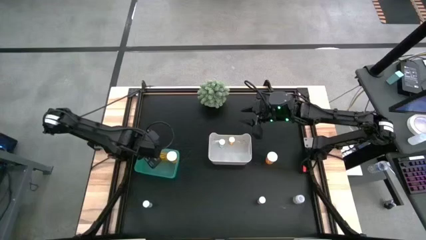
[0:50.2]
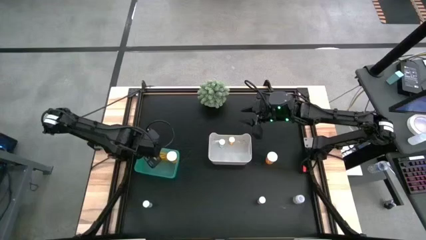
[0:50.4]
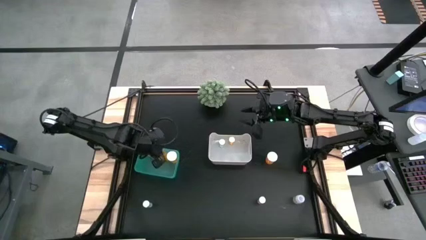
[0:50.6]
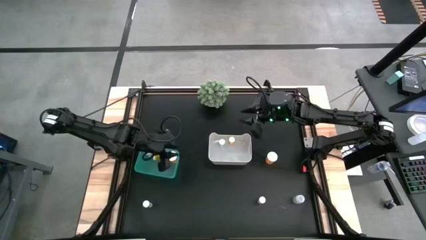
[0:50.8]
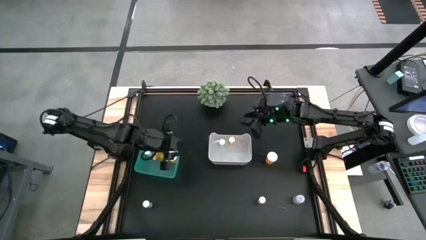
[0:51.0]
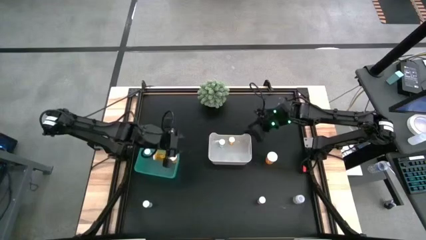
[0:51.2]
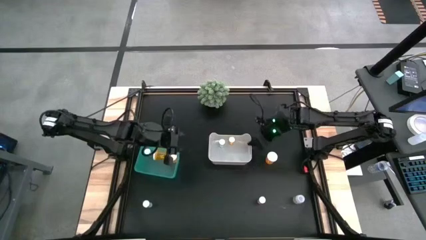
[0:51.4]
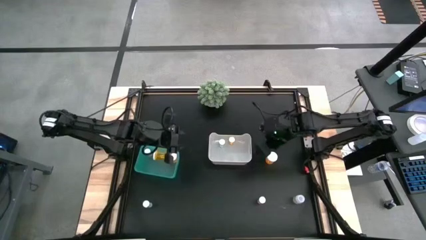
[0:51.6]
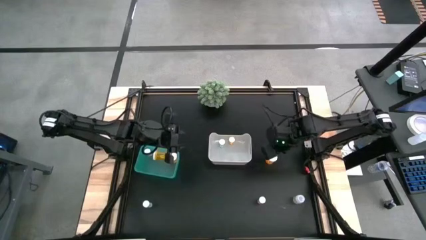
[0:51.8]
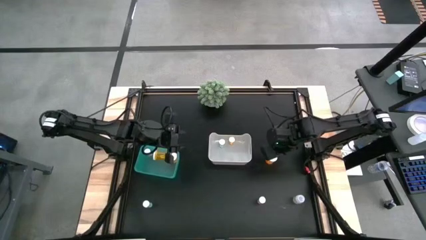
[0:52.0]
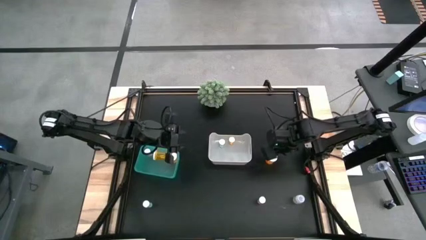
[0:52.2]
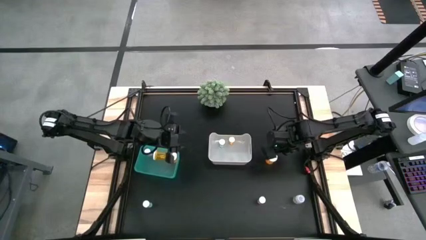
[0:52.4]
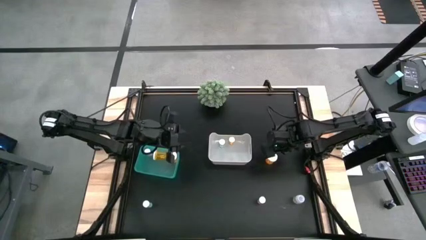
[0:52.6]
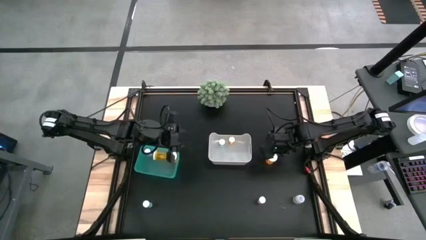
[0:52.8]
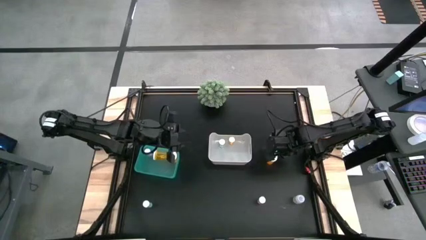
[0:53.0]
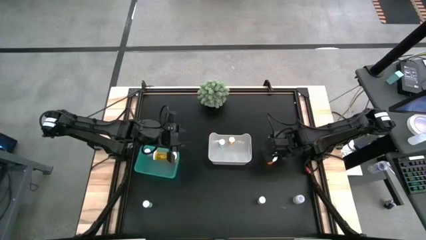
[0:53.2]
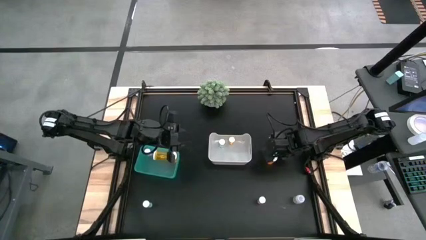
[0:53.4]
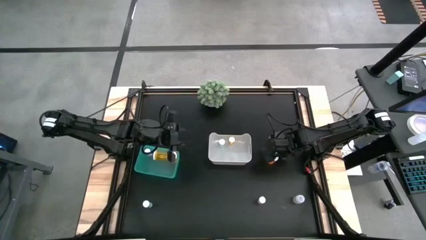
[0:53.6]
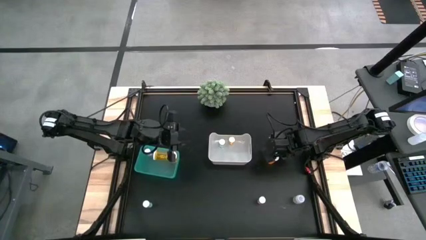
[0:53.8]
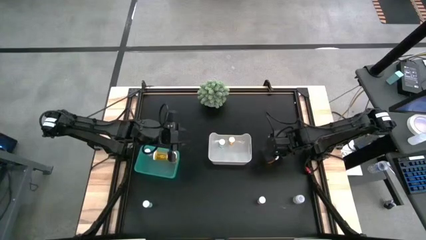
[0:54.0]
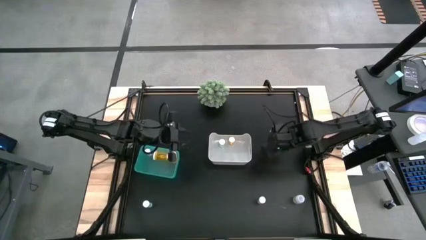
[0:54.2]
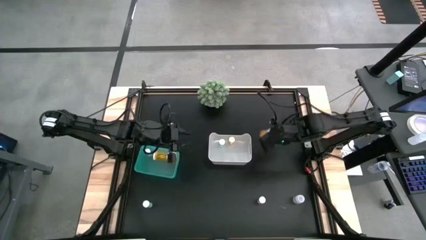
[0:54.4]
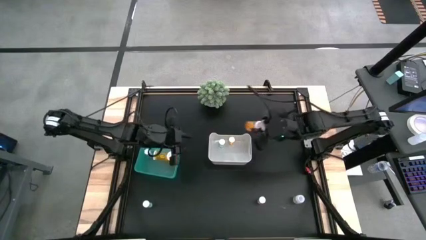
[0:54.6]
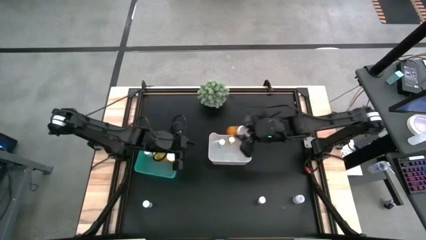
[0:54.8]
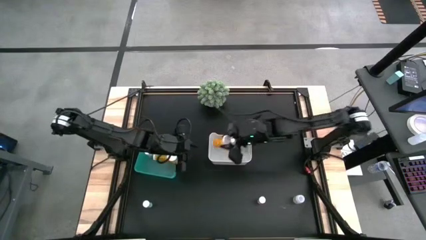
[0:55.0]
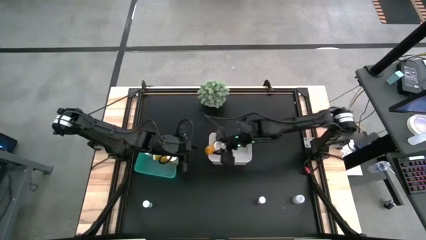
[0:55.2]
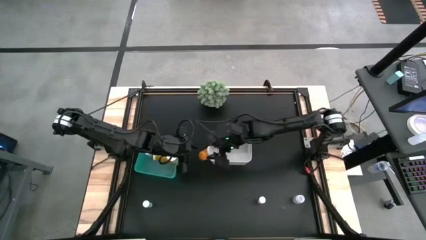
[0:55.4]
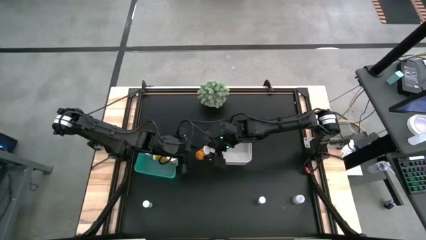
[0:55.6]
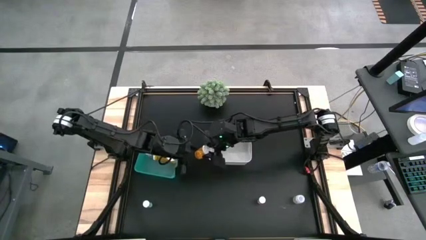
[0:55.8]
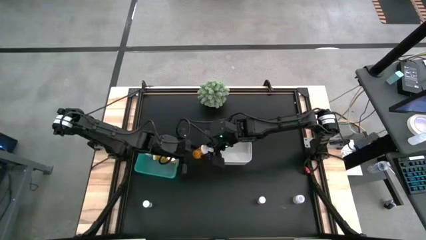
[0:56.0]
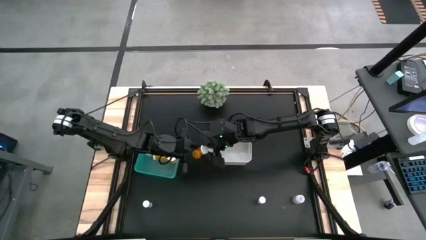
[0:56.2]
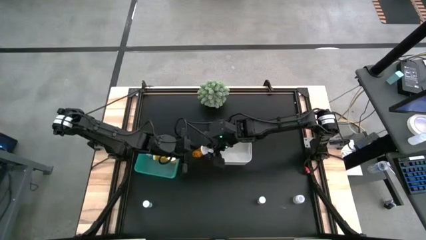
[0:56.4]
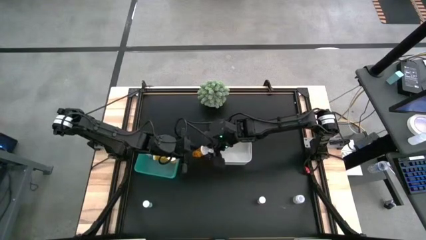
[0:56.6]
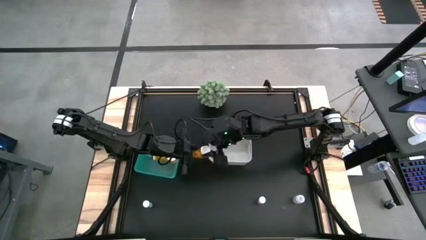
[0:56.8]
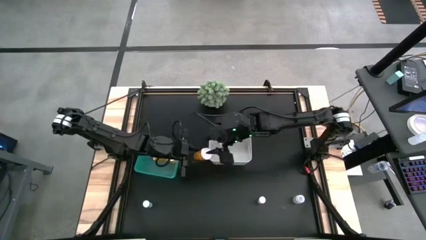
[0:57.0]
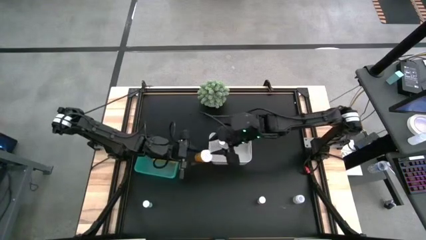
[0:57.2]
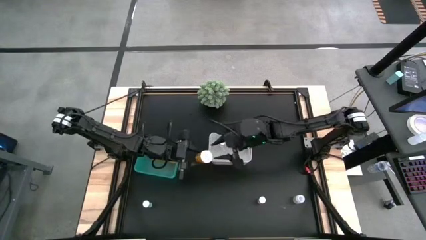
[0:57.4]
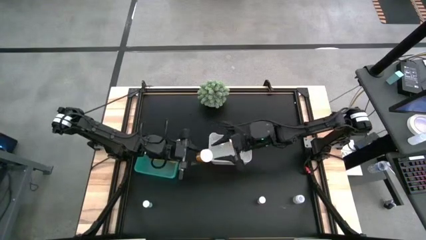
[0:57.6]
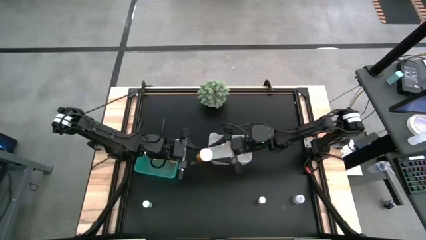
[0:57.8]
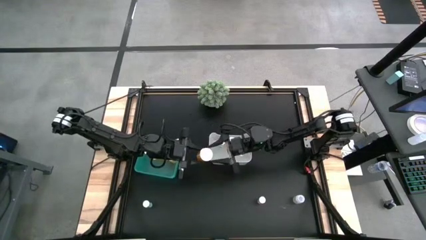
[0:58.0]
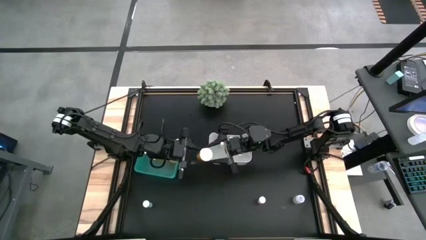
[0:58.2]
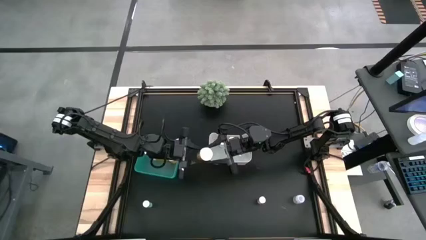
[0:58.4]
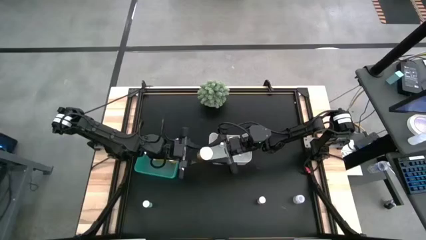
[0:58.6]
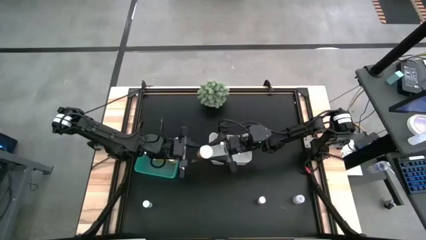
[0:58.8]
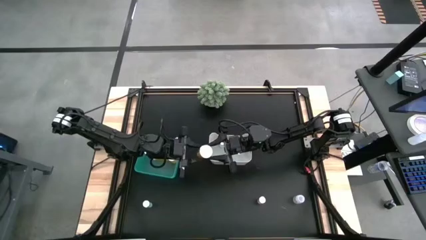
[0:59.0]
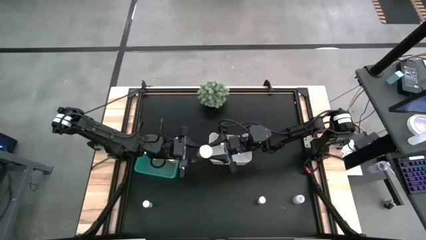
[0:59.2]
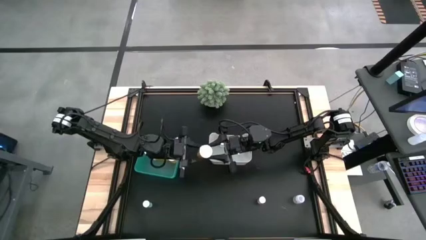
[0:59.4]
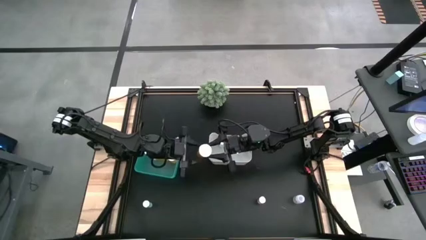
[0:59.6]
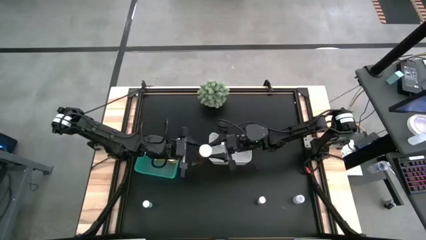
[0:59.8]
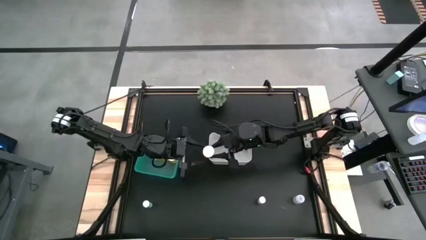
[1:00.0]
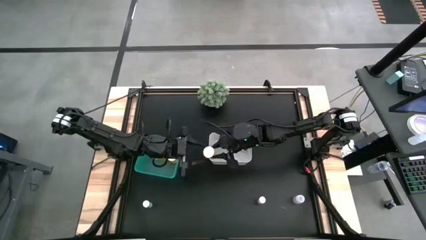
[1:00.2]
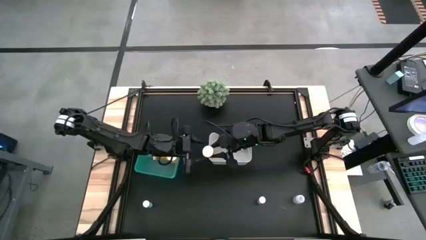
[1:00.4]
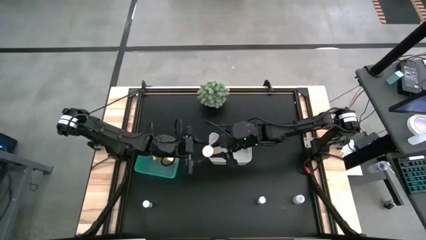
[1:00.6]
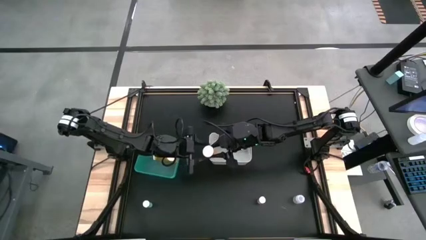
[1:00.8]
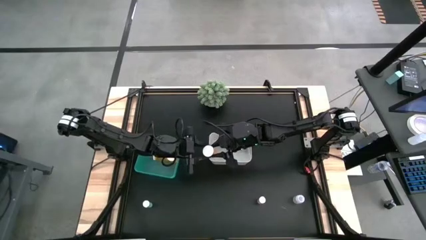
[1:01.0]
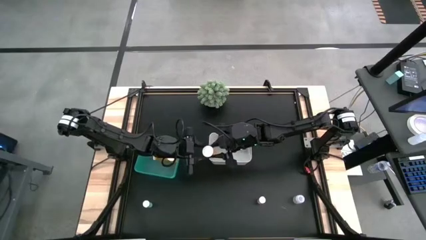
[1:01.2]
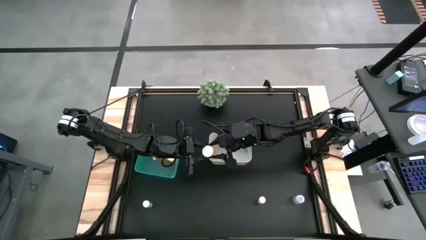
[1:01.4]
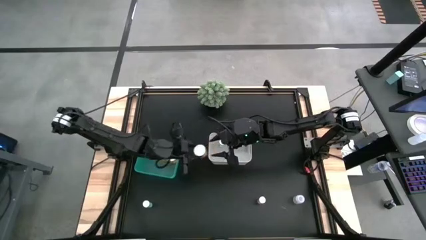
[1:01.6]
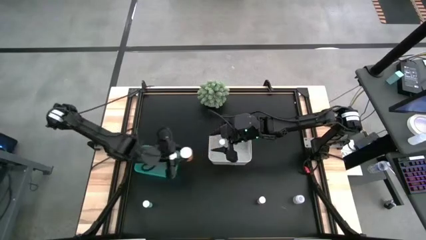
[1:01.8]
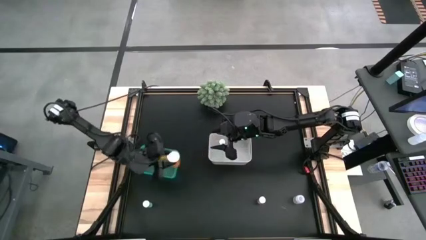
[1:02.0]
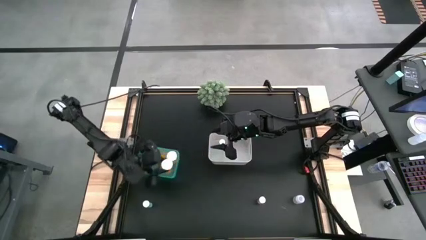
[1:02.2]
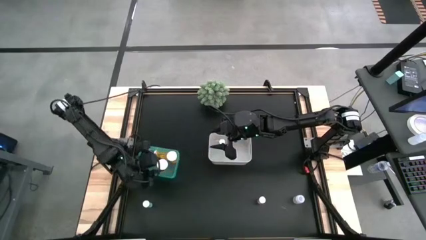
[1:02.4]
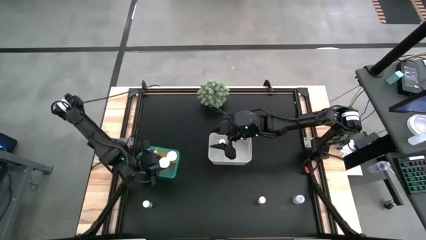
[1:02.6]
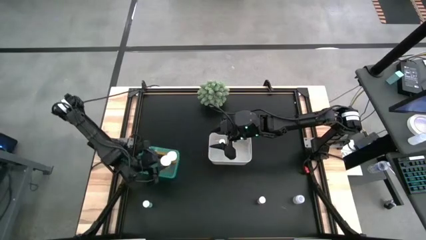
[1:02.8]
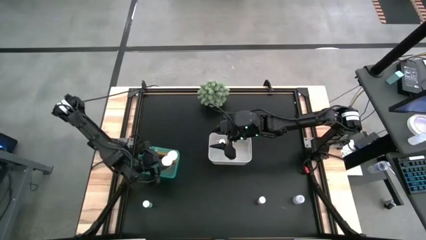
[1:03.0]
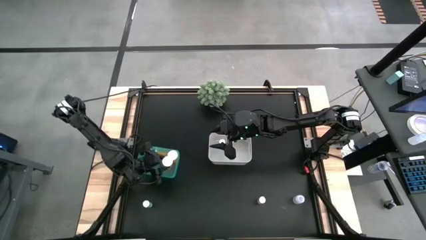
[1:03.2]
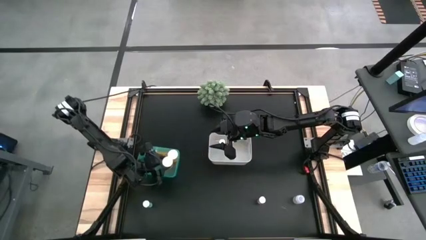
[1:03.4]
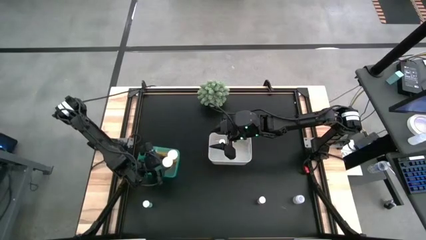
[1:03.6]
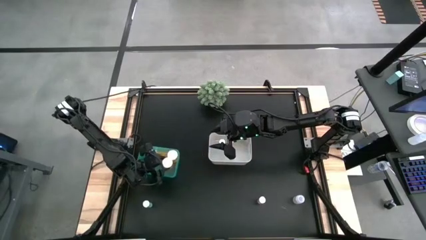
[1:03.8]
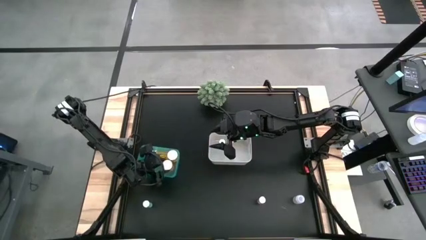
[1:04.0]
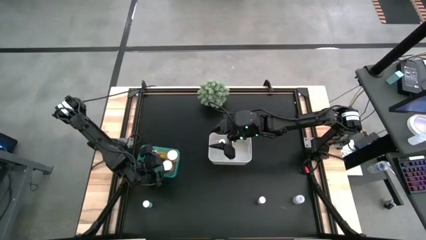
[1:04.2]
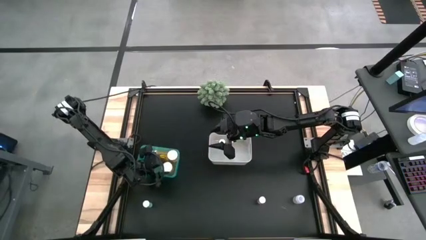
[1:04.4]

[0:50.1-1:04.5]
Task: Pick and place medicine bottles into bin by pill shape (circle, oval)
Put the orange capsule bottle into the blue bin

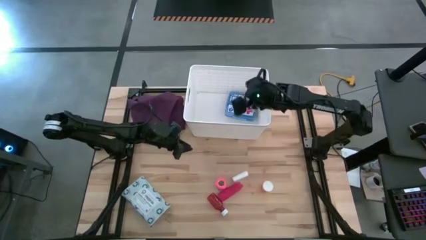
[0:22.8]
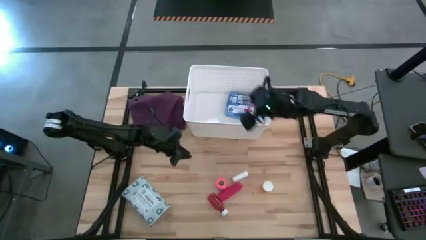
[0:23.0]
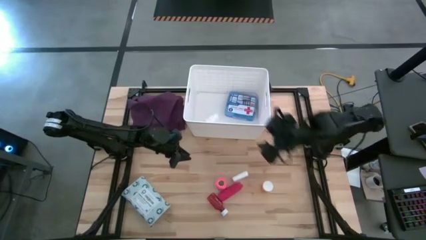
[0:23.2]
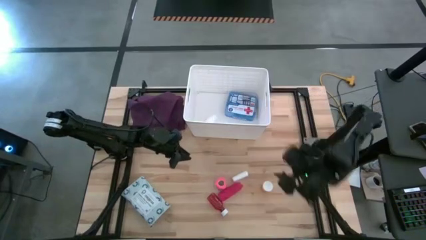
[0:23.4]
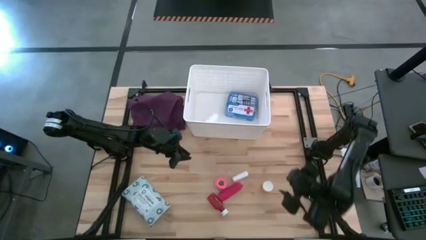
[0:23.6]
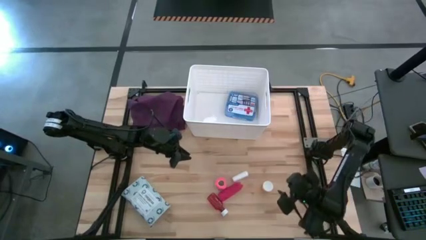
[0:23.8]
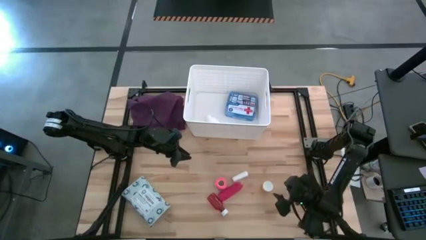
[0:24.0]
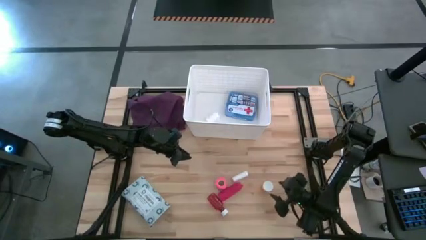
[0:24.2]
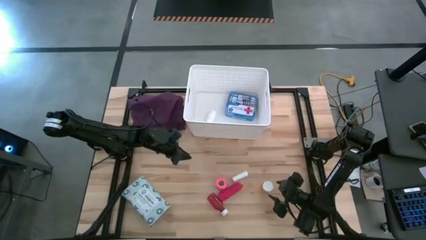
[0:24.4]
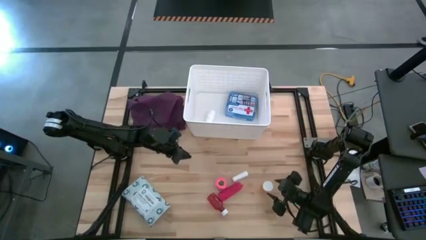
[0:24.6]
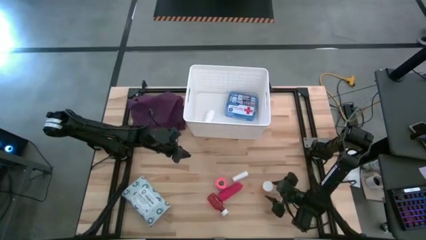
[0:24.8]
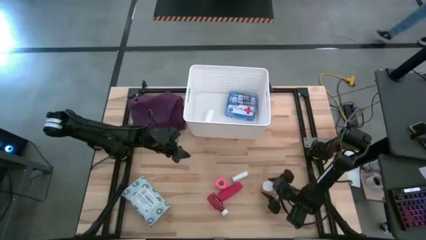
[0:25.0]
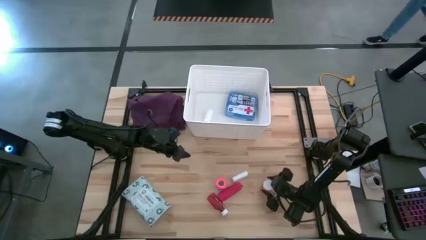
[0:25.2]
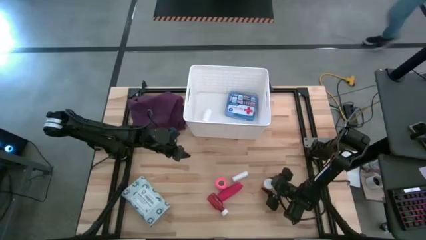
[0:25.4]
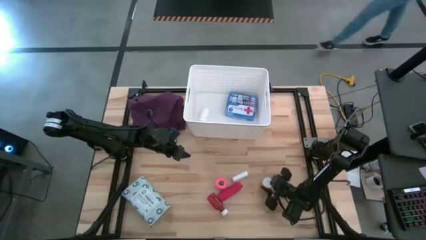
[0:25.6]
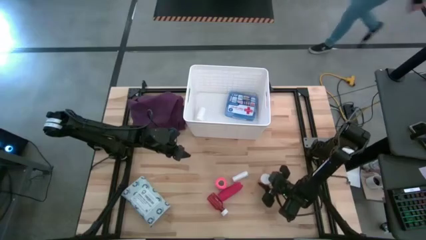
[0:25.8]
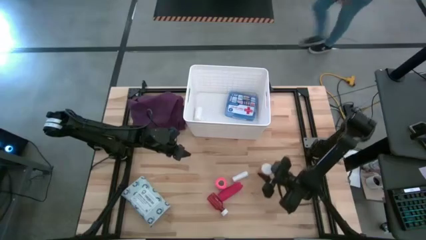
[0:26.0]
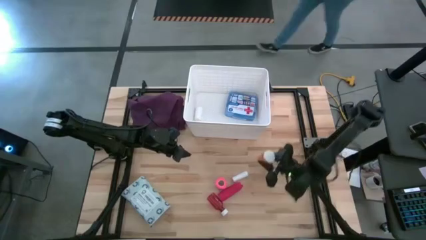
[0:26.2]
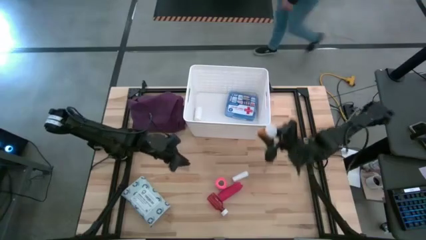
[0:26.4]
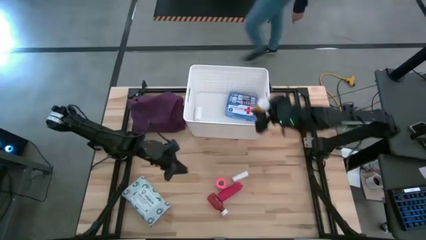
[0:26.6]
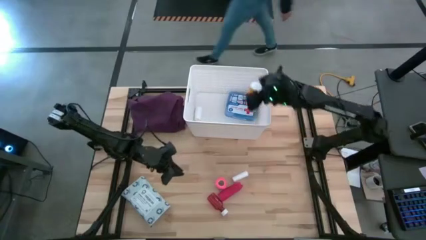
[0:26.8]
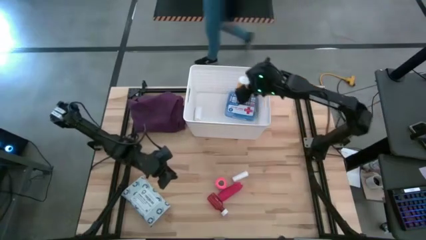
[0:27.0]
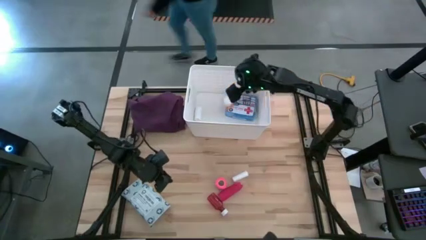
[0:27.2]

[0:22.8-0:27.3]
Task: Pick & place medical supplies in basket/bin
Put the orange medicine bottle into the white bin
